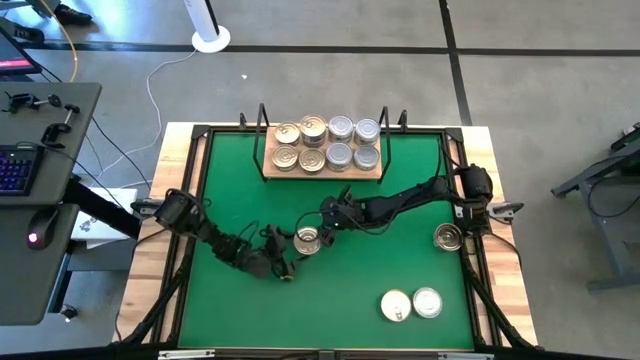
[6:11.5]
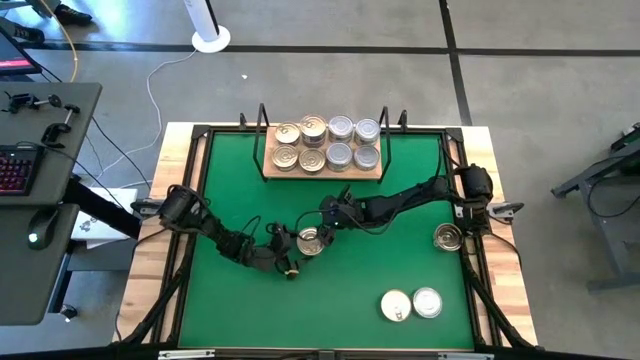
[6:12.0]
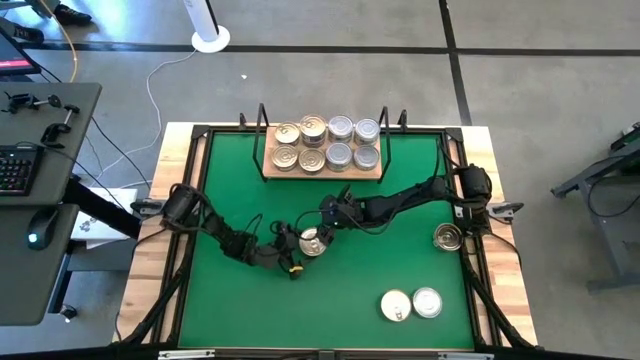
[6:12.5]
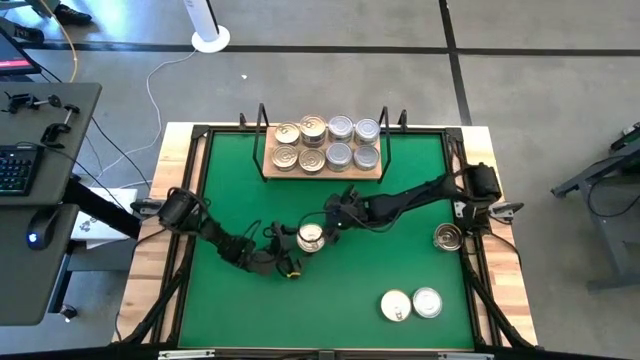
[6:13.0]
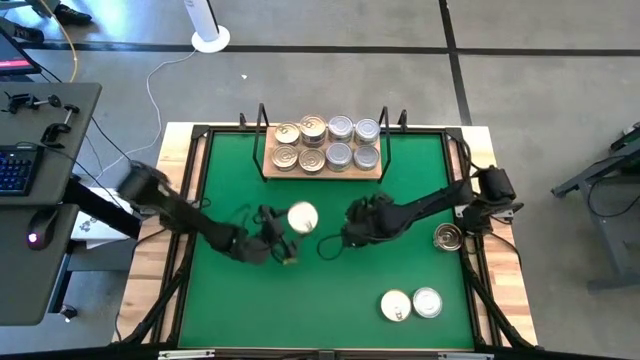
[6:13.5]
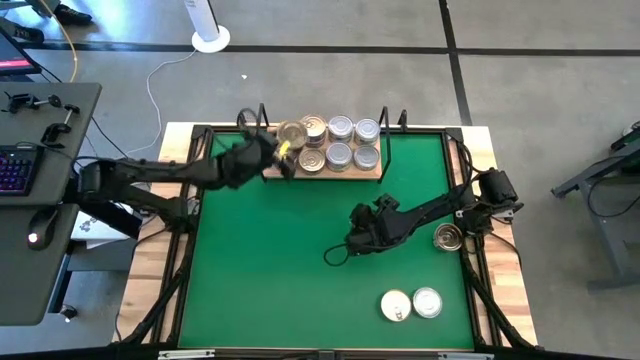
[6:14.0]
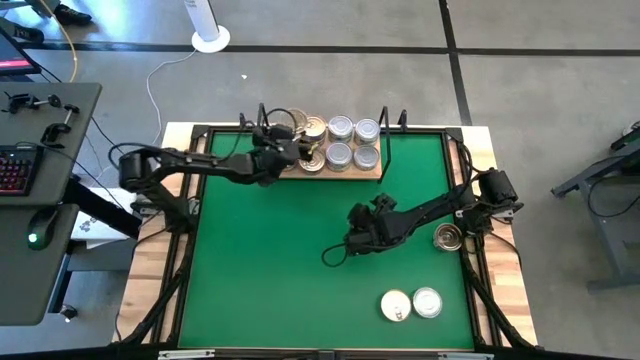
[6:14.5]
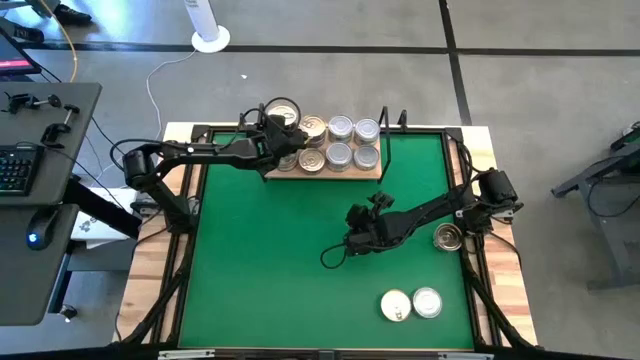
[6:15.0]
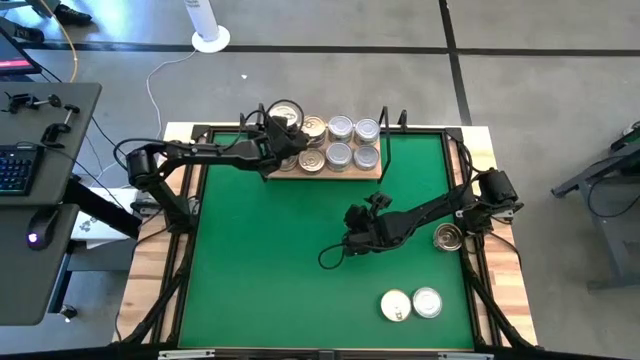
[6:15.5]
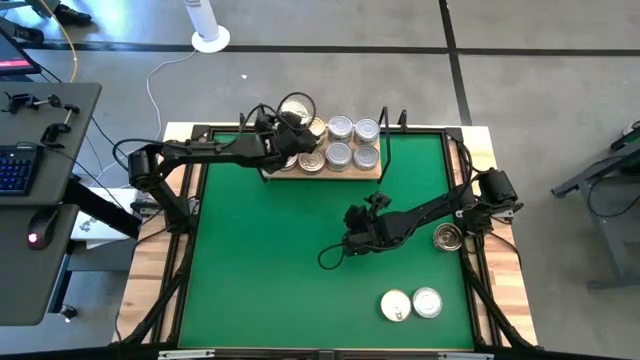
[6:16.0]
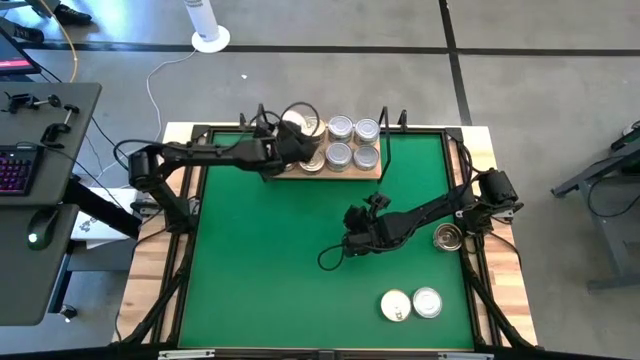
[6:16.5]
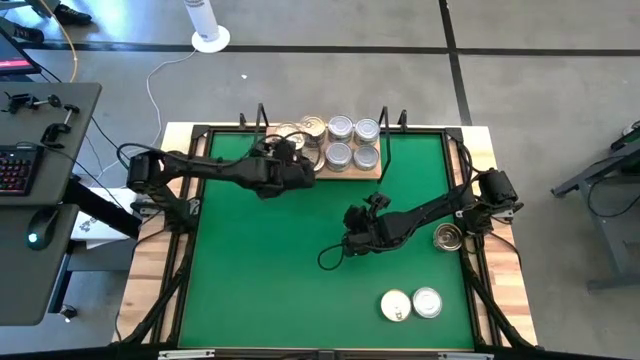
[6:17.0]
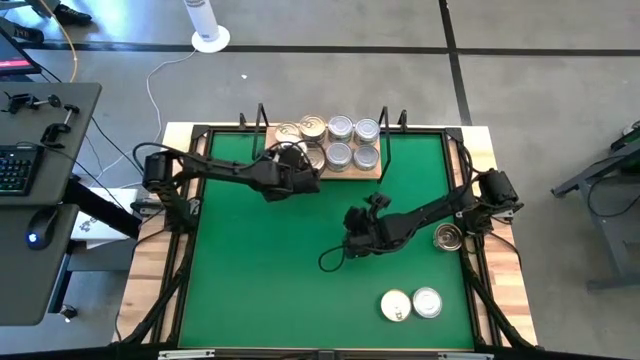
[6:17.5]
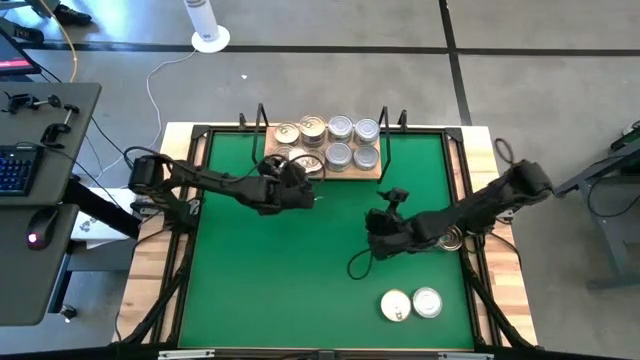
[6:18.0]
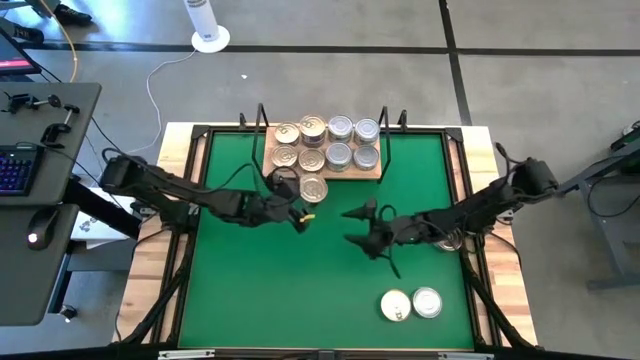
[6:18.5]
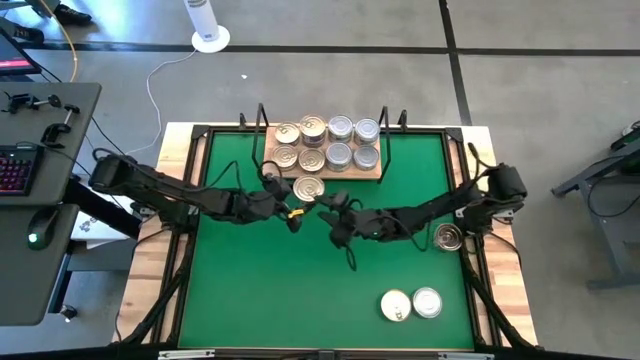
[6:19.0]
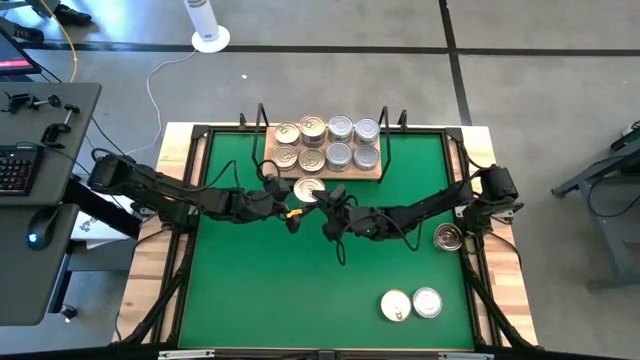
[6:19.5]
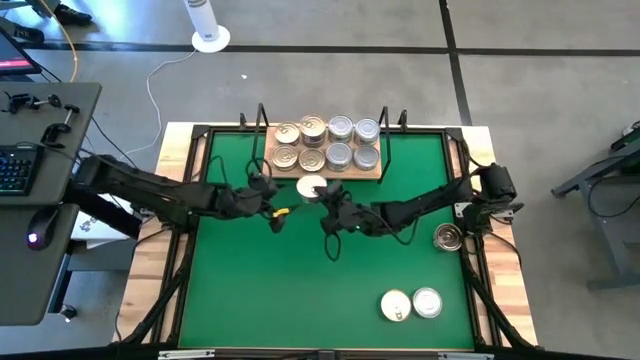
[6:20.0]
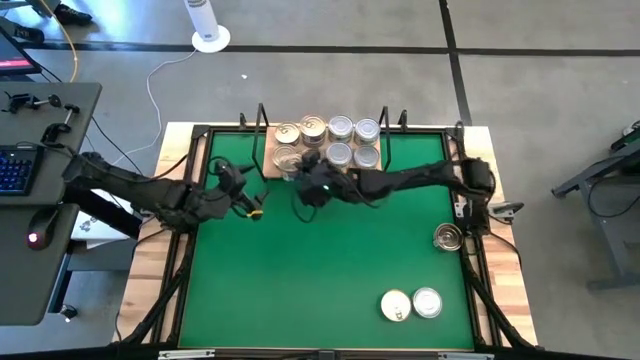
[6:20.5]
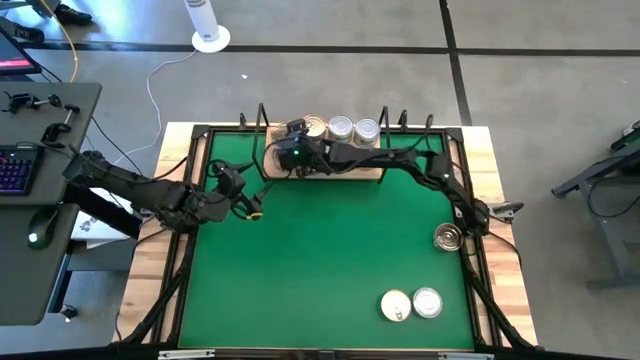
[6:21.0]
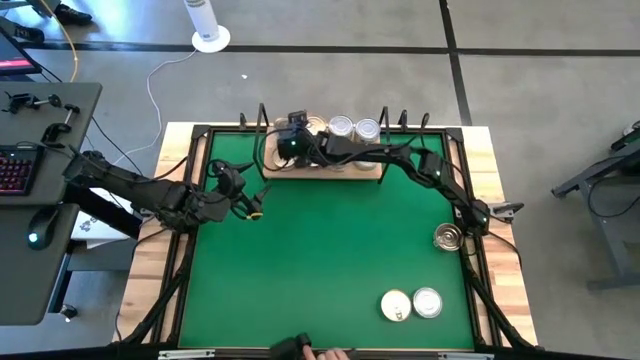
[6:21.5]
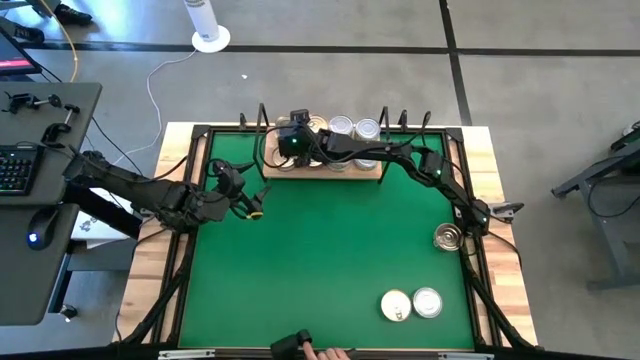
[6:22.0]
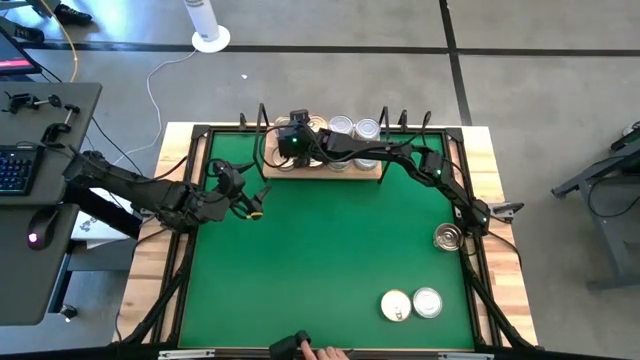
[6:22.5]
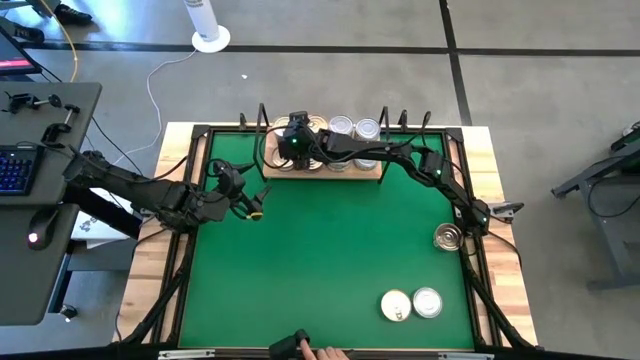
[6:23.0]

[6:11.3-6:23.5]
Task: Stack canned seafood by type on shelf
Stack the blue/pink tuna can on top of the other blue/pink tuna can on the shelf

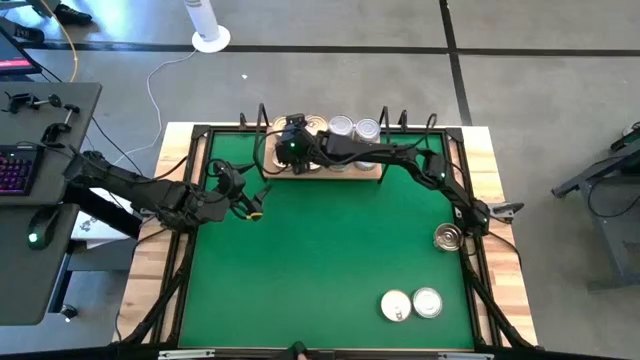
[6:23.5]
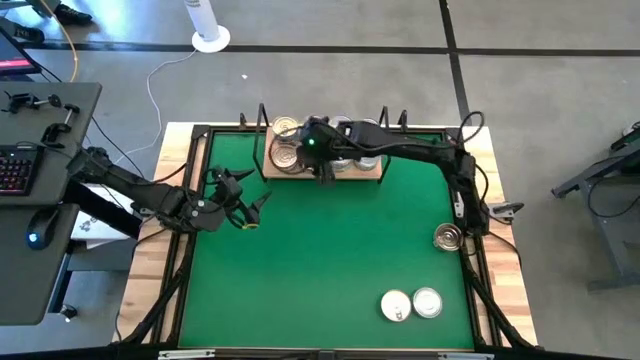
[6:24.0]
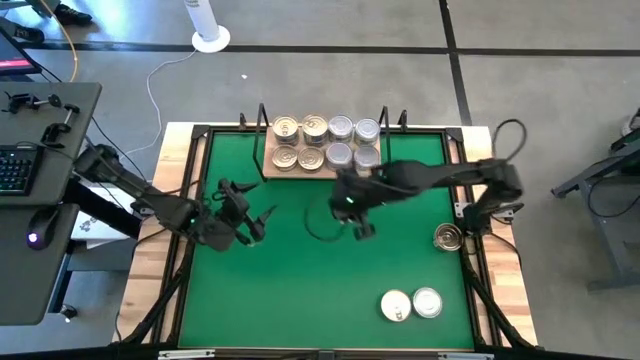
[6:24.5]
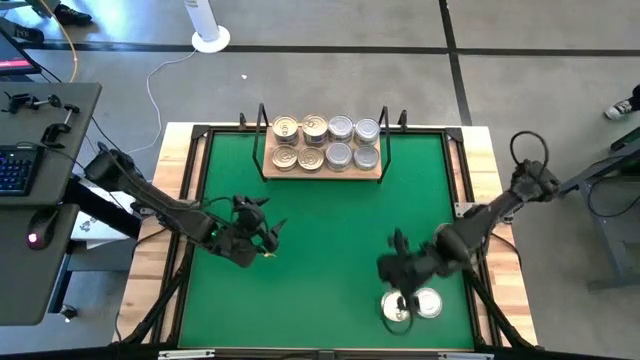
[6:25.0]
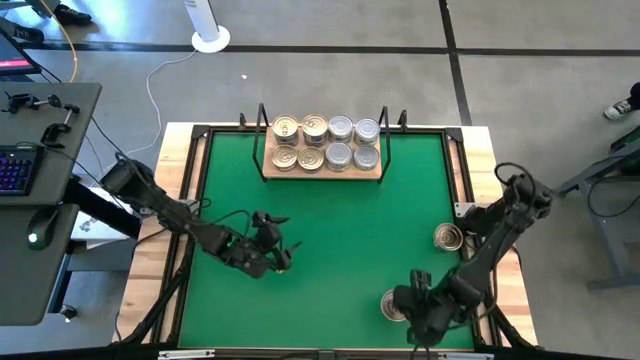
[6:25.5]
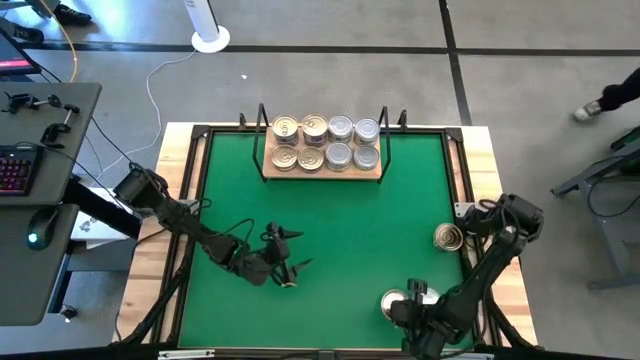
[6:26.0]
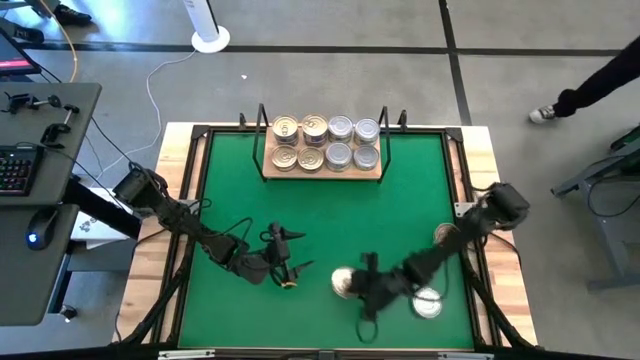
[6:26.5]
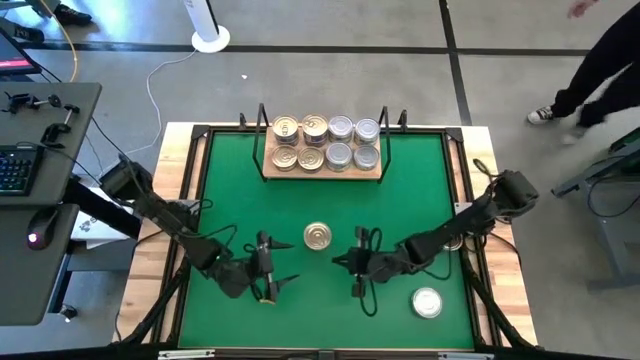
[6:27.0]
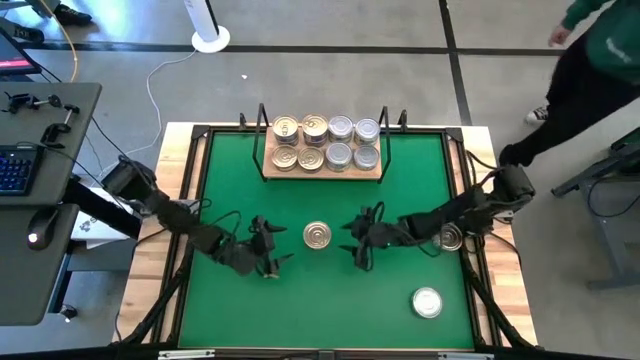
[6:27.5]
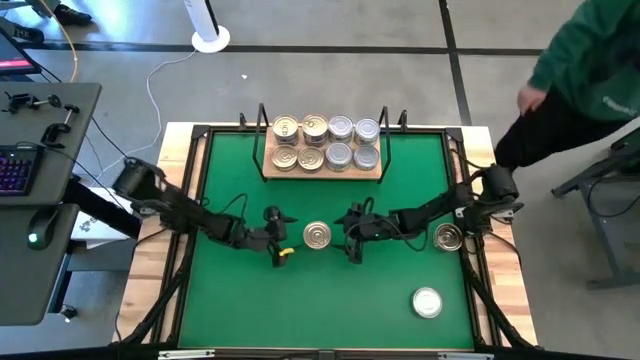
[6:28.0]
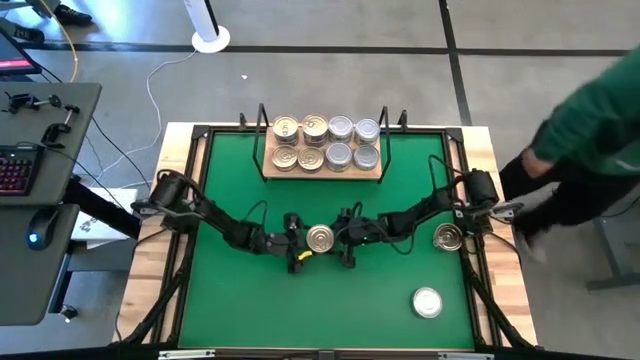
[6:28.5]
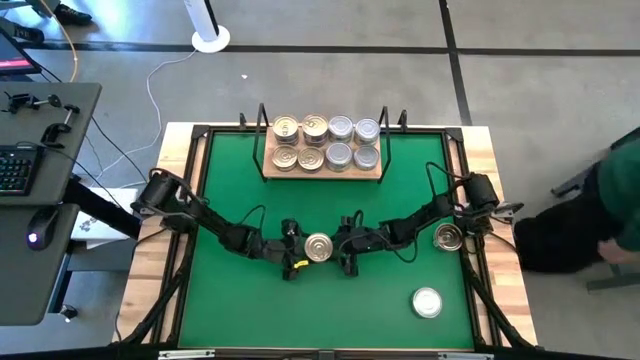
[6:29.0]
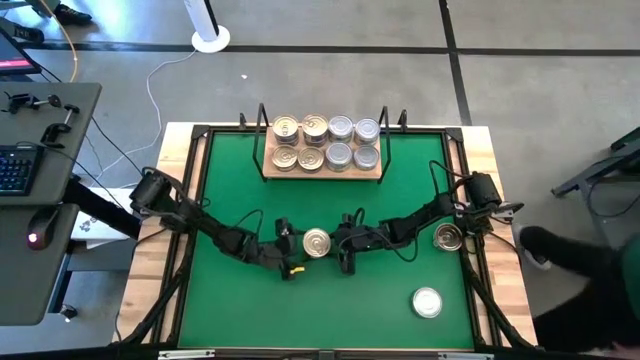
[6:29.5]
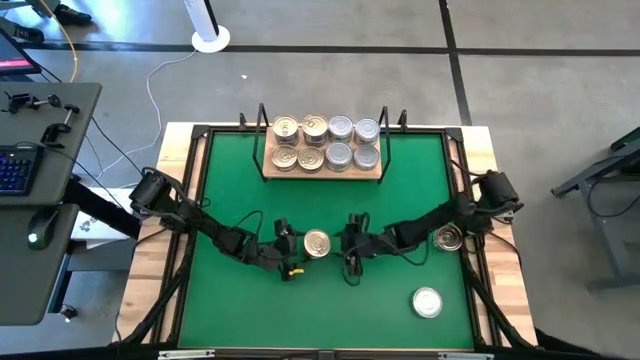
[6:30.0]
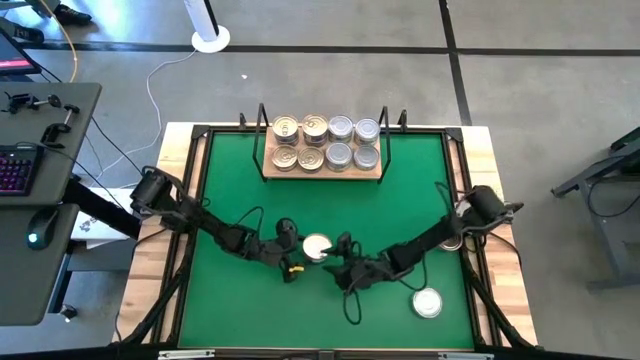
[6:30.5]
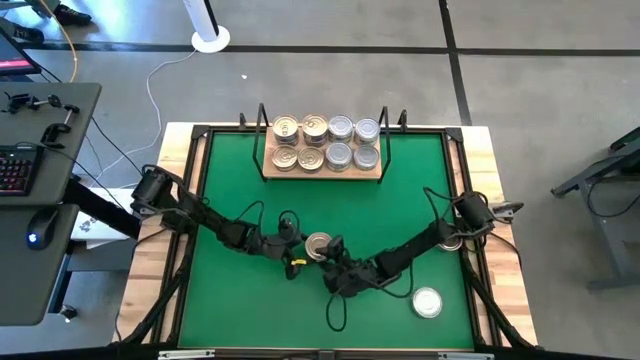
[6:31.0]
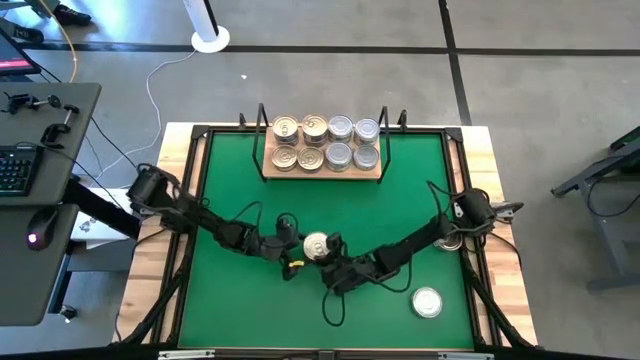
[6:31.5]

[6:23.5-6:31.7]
Stack the blue/pink tuna can on top of the other blue/pink tuna can on the shelf

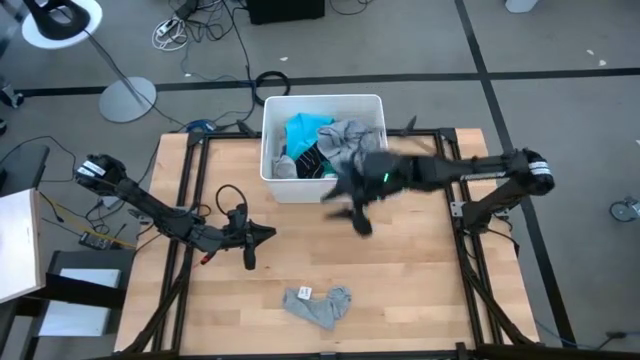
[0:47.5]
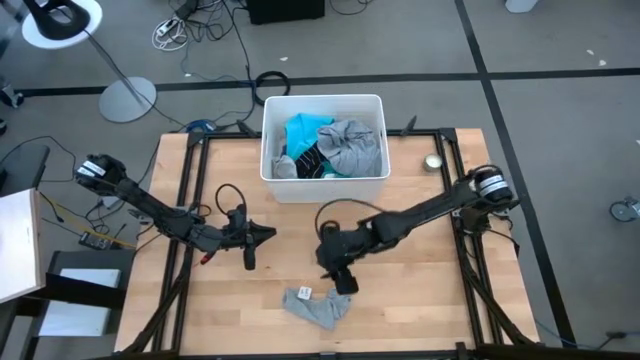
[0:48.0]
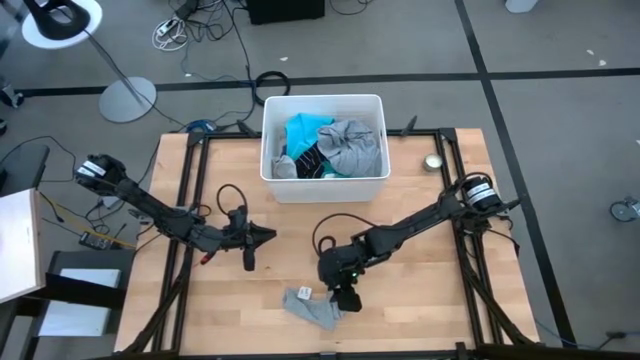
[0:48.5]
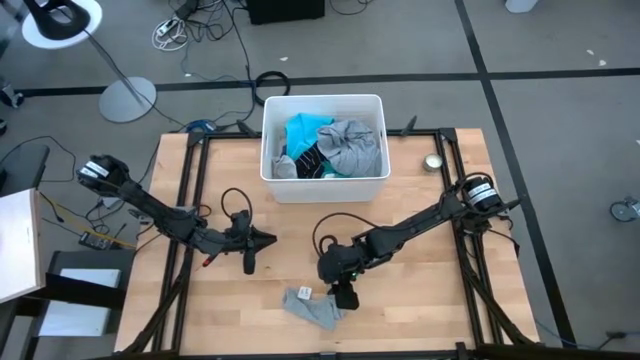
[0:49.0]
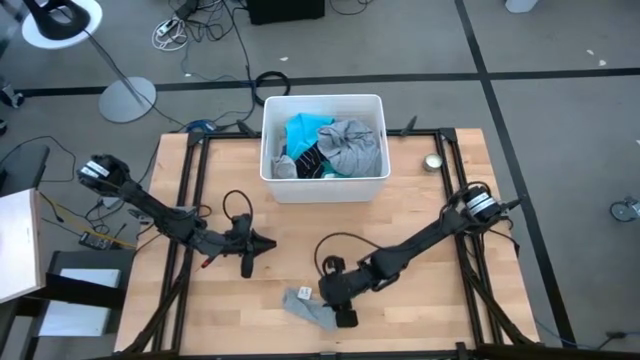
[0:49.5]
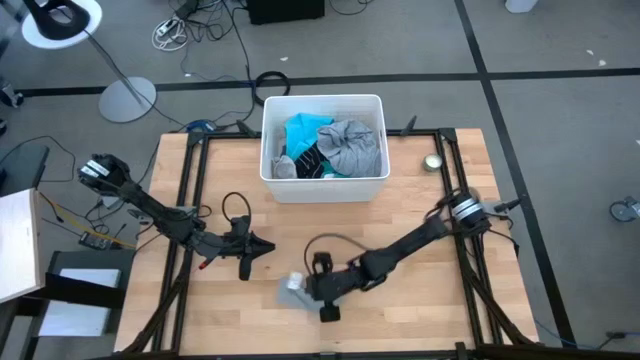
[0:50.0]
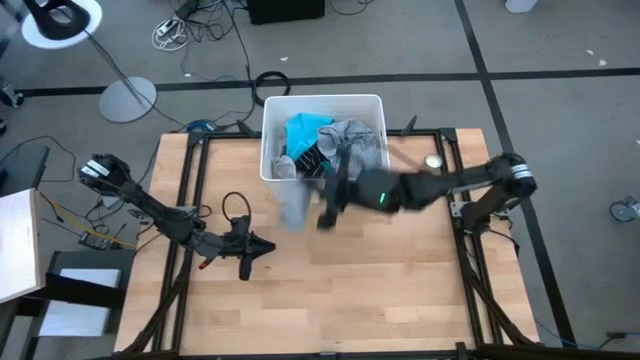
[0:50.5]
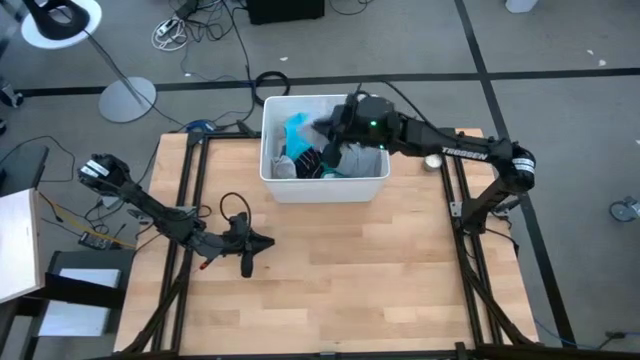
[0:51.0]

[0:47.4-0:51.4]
Task: Sort clothes
Put the gray sock into the white bin
